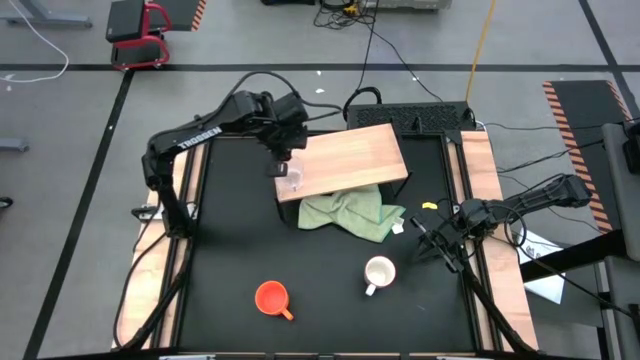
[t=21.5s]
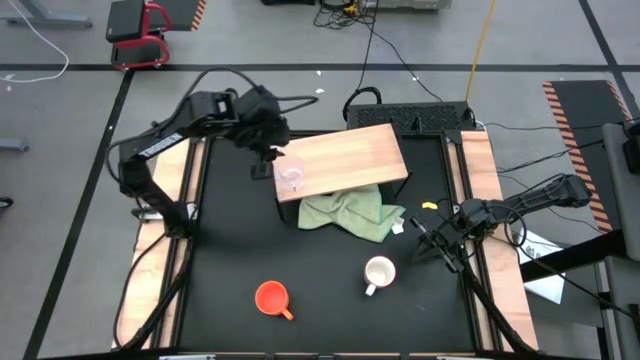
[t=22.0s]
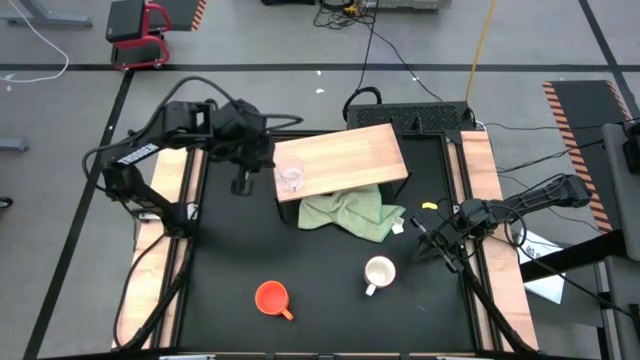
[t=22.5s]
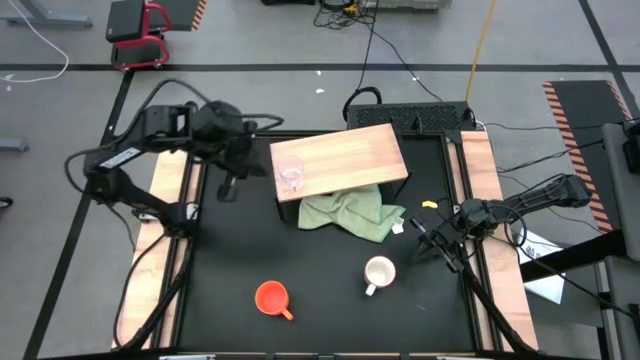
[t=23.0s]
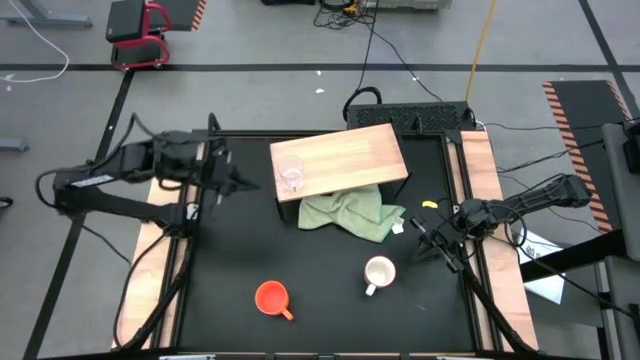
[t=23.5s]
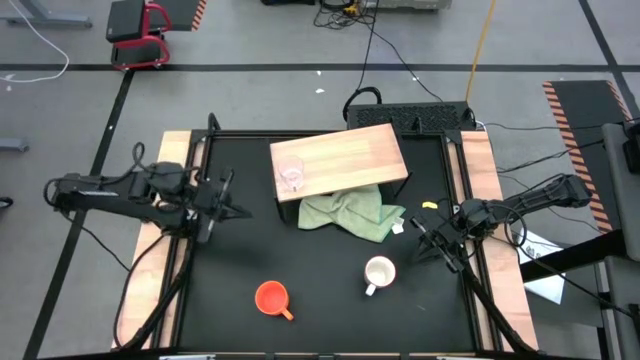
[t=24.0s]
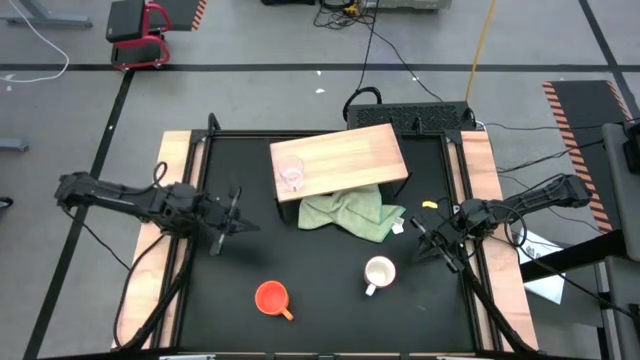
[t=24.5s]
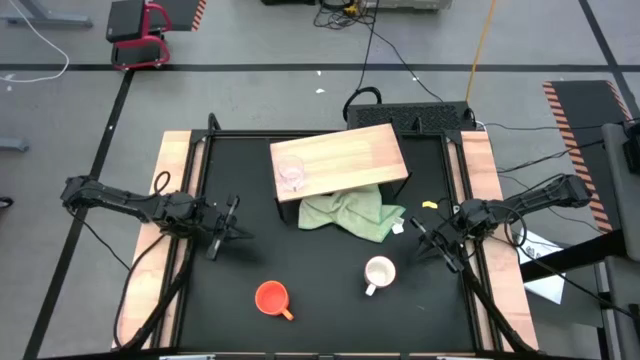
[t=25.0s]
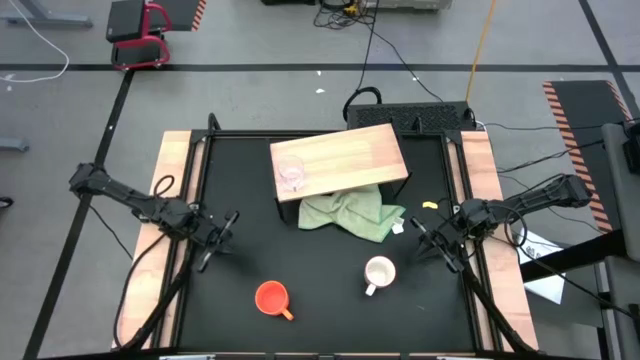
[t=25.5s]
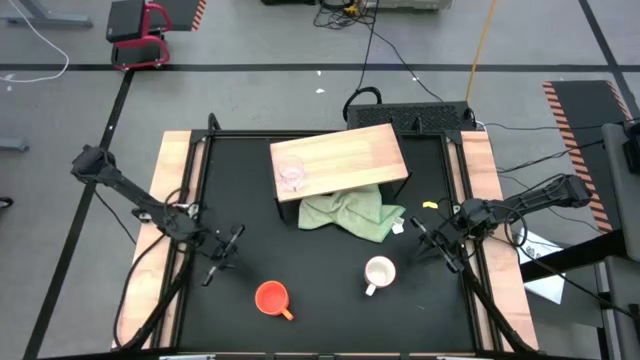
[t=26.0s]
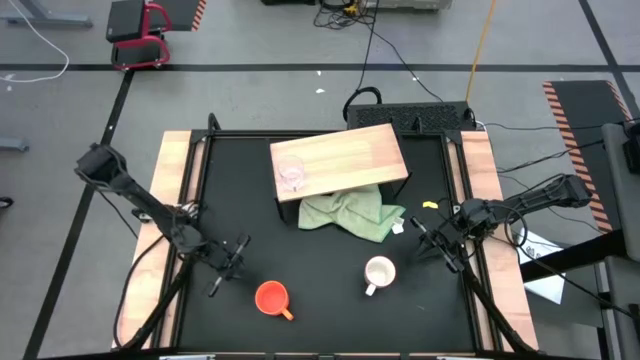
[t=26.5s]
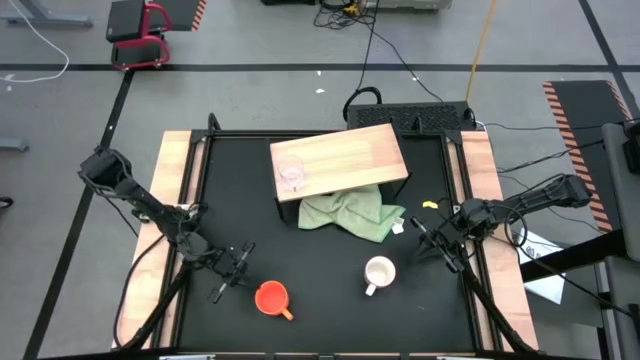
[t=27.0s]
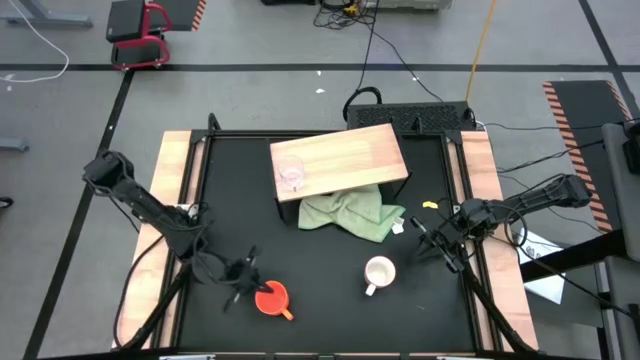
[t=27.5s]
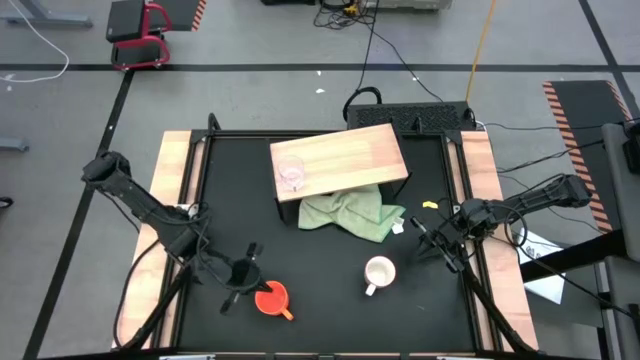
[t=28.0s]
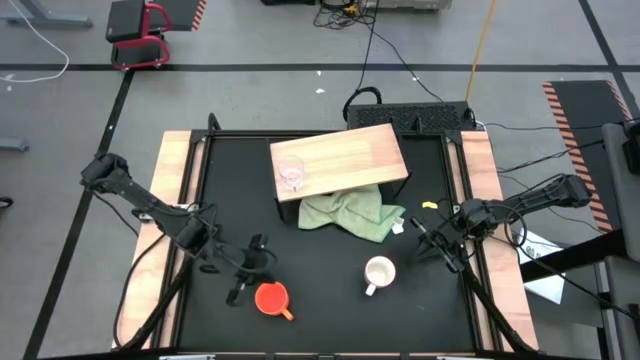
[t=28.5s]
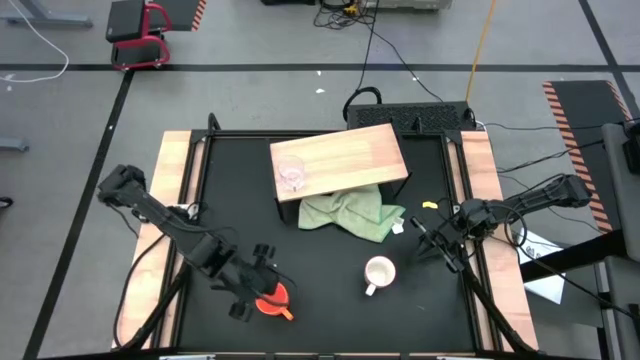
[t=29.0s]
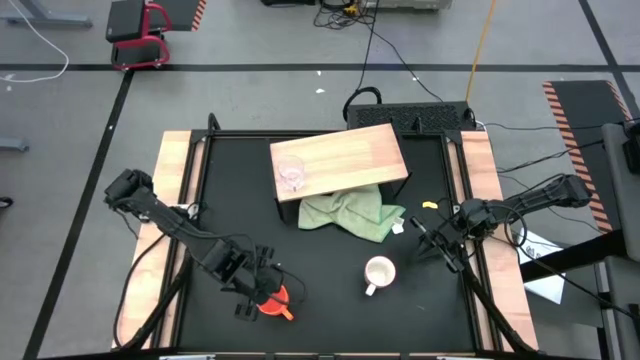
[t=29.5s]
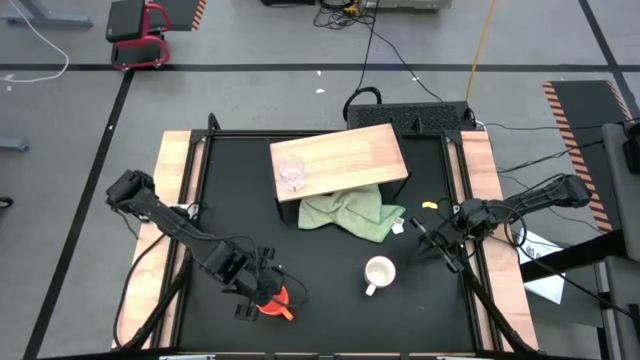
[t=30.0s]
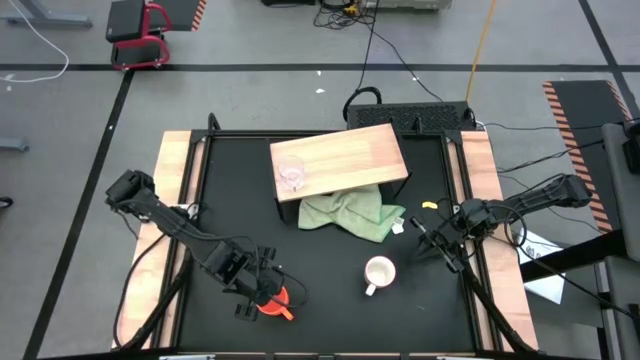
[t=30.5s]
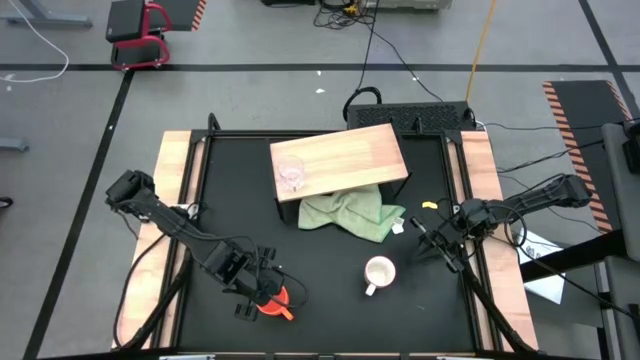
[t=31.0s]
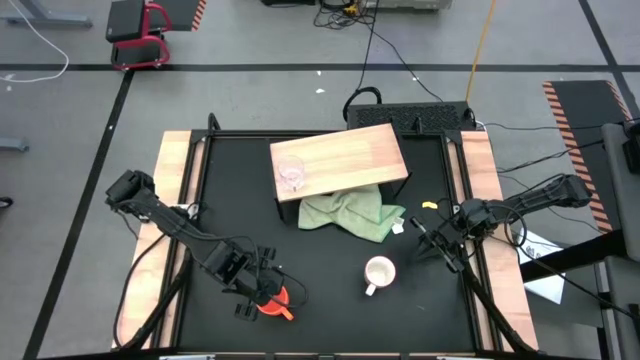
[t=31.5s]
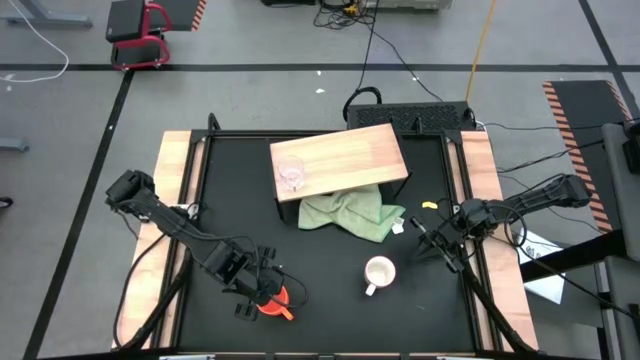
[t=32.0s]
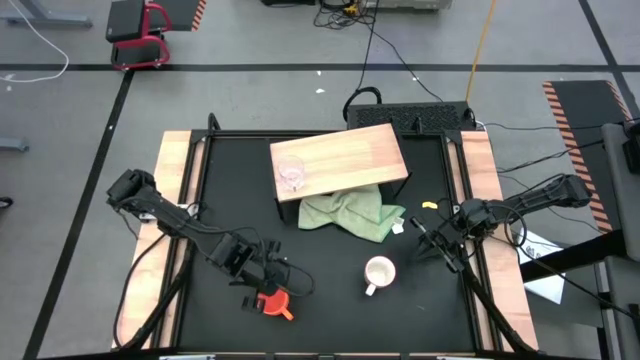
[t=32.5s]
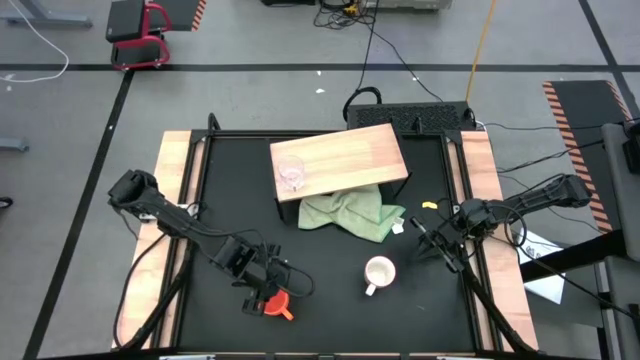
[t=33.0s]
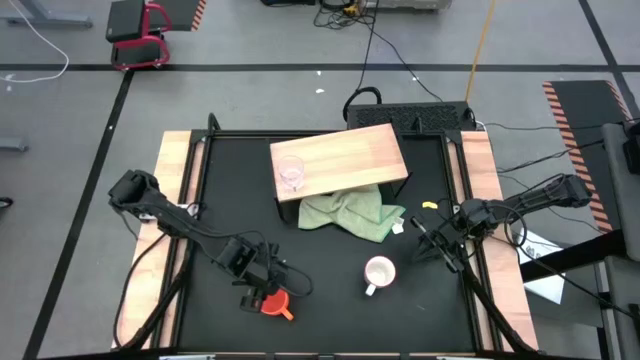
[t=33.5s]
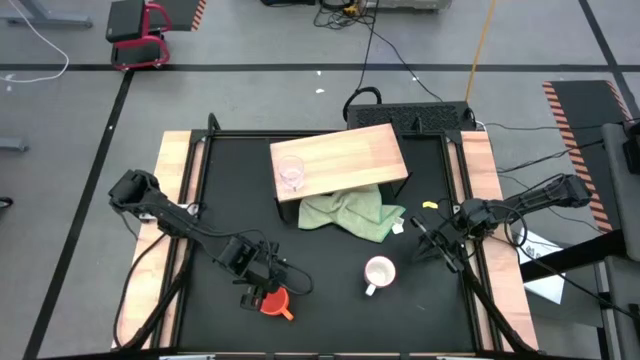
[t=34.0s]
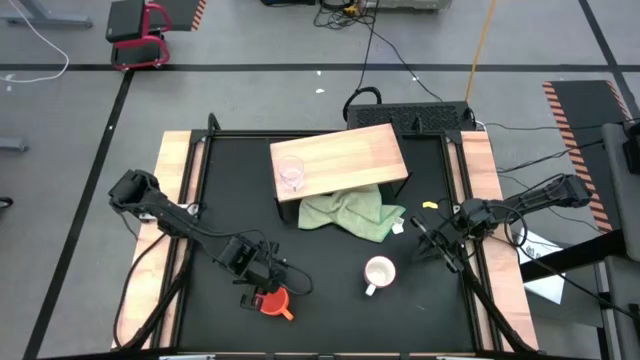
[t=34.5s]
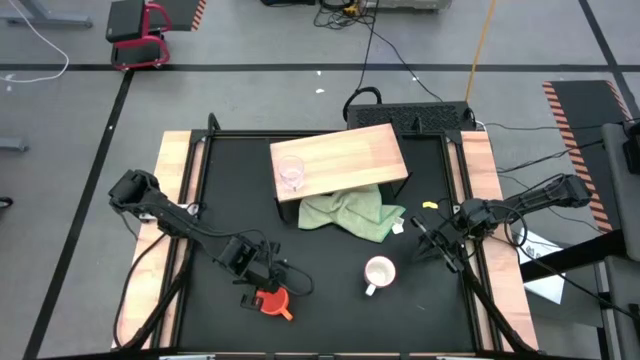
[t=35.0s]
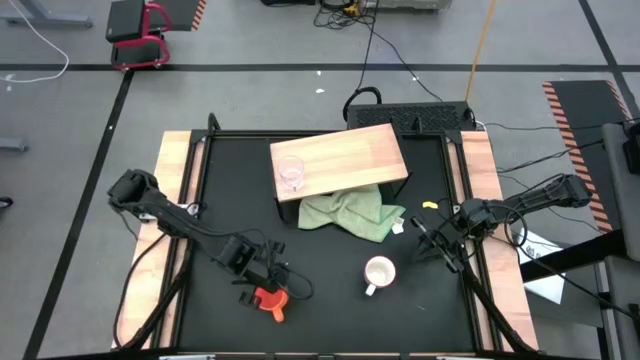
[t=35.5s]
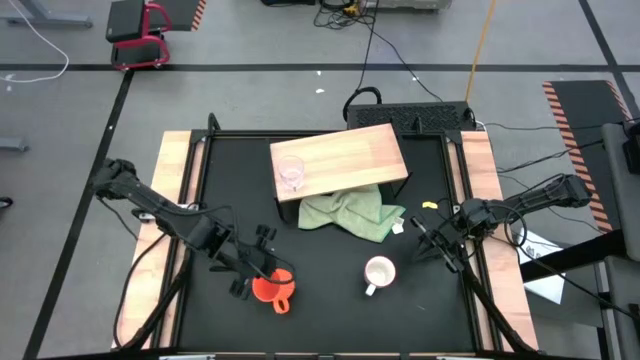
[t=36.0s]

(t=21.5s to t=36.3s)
Task: Stack small to large cups/mugs on shelf
Put orange cup on the shelf

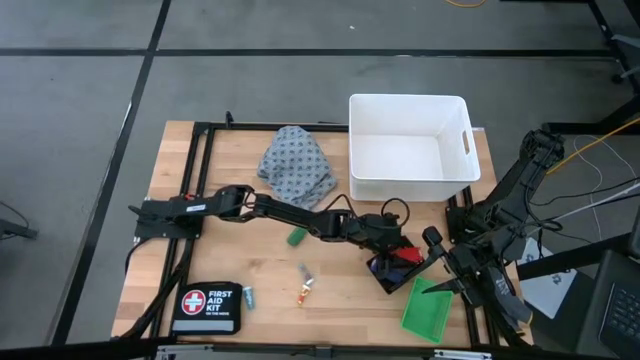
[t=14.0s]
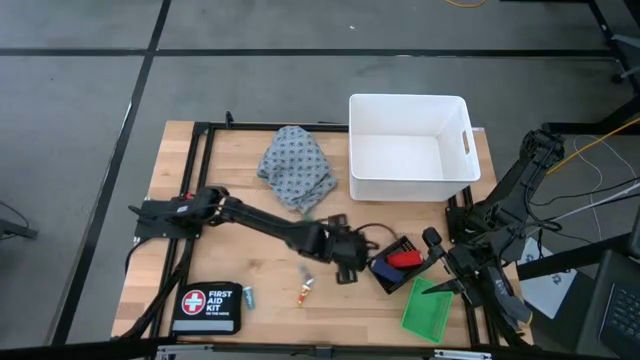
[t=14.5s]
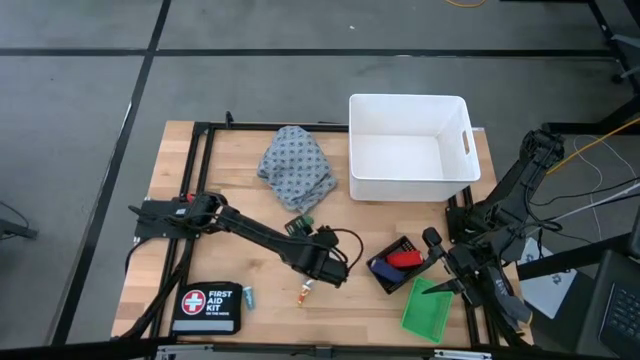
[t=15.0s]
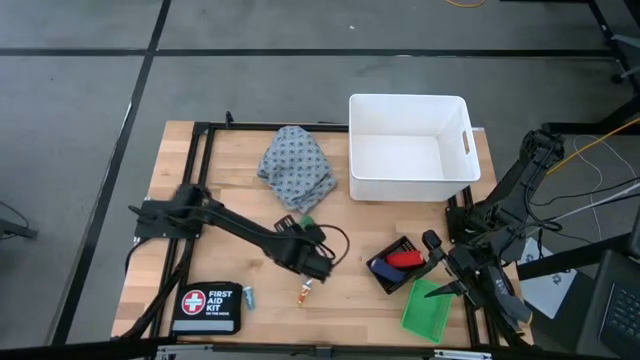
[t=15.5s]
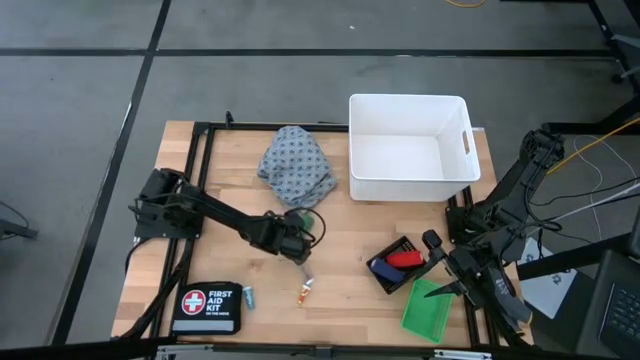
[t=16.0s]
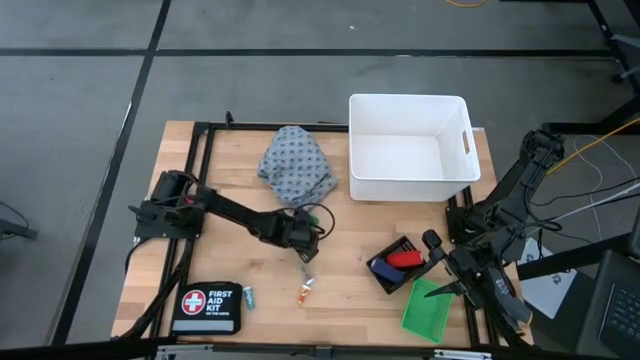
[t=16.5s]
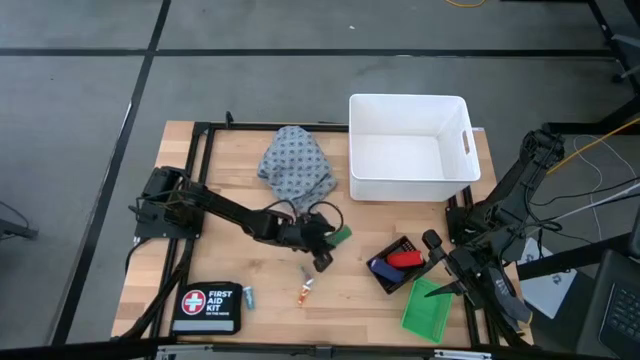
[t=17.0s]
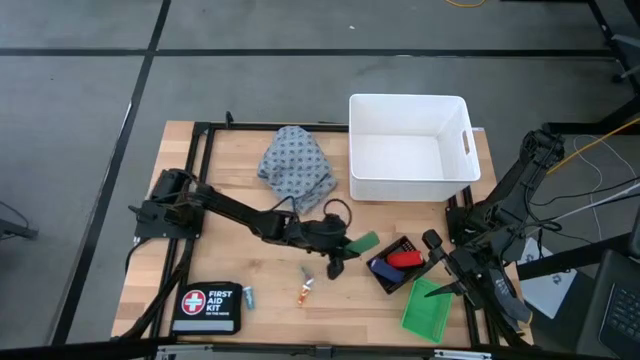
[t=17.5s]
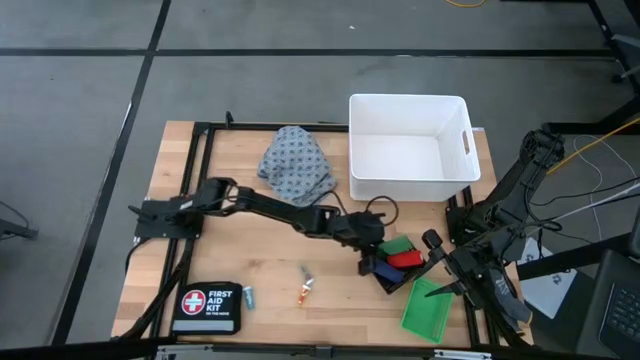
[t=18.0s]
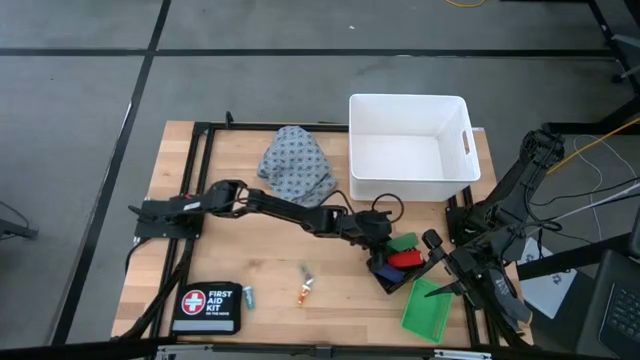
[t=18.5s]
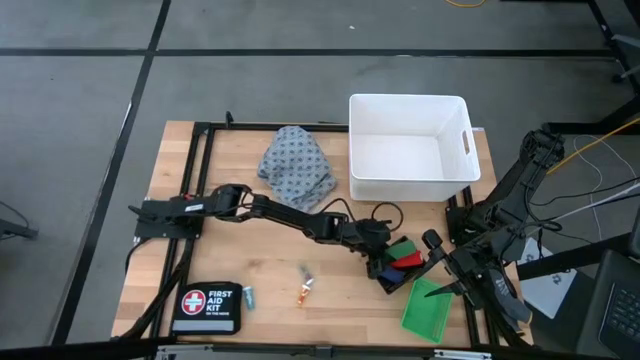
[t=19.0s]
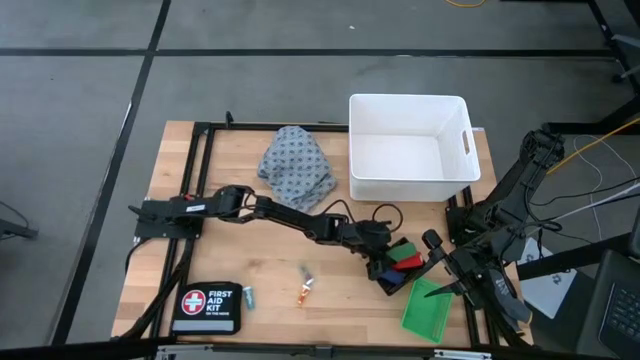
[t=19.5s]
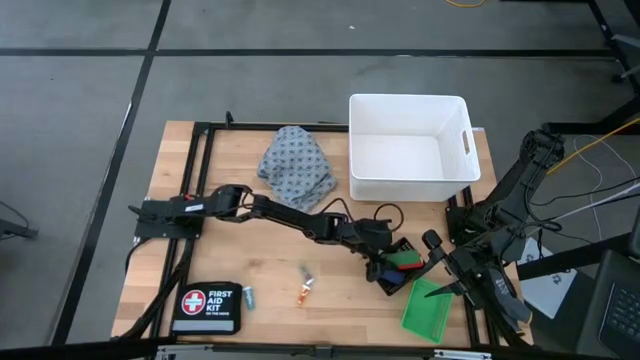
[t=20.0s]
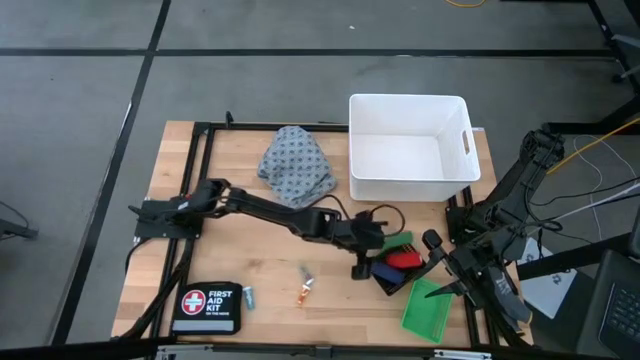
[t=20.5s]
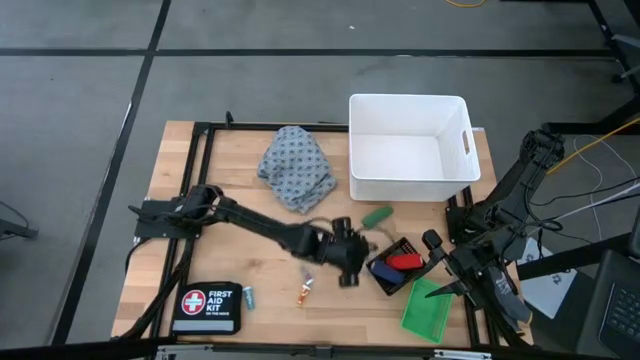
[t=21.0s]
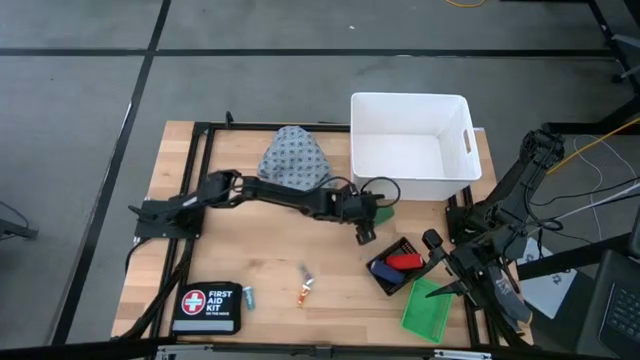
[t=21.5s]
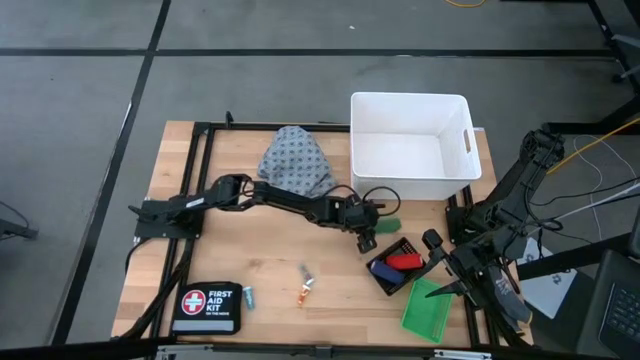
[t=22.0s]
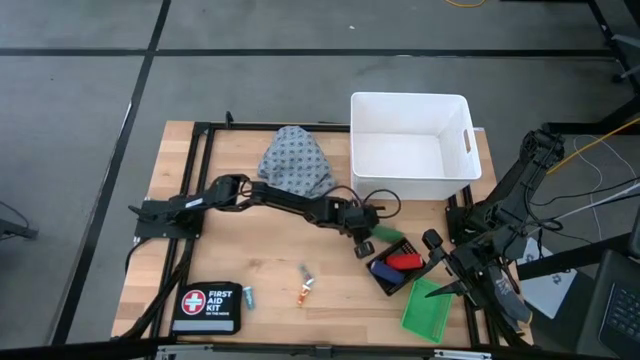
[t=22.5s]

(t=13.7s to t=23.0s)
Task: Pick & Place Medicine items
Put the green bandage into the black bin
